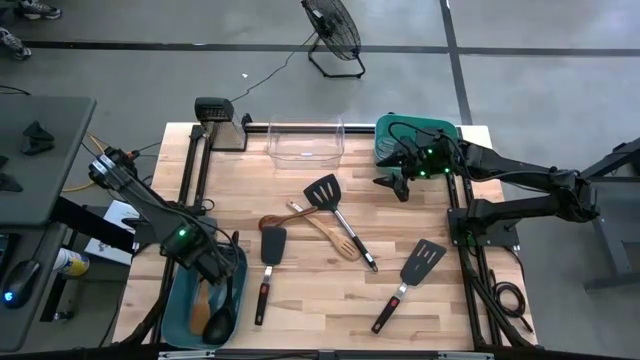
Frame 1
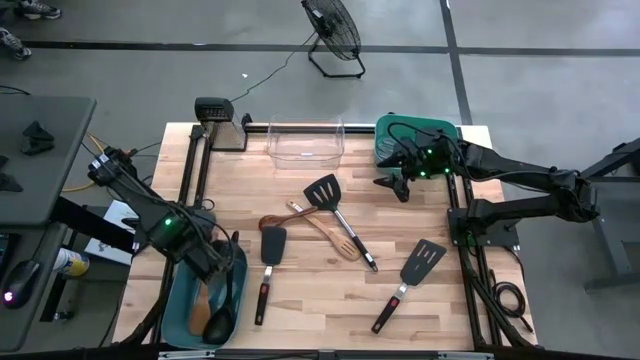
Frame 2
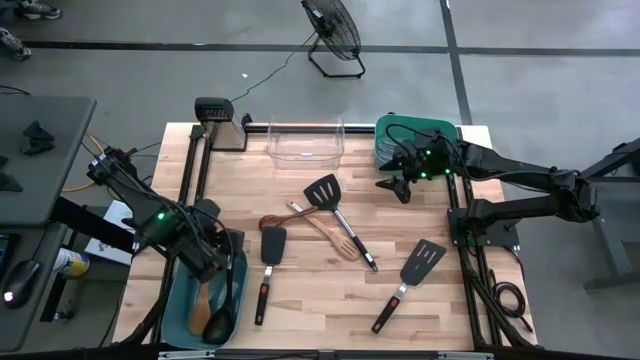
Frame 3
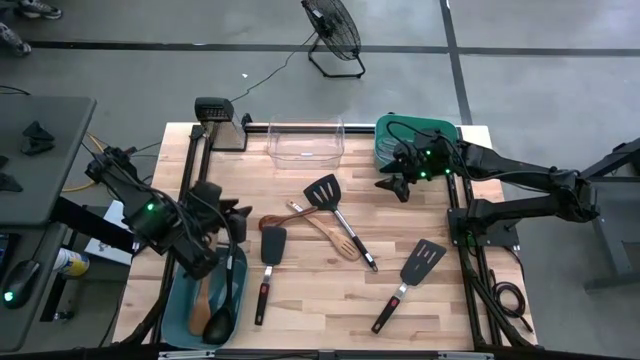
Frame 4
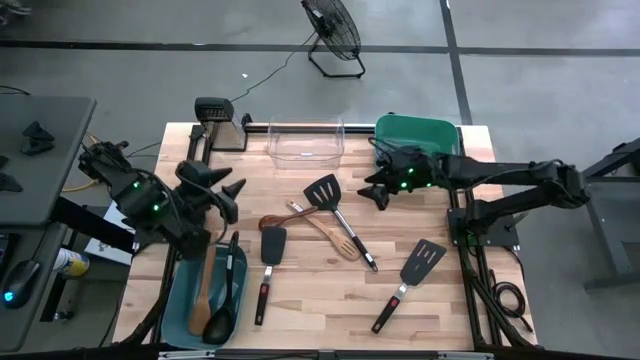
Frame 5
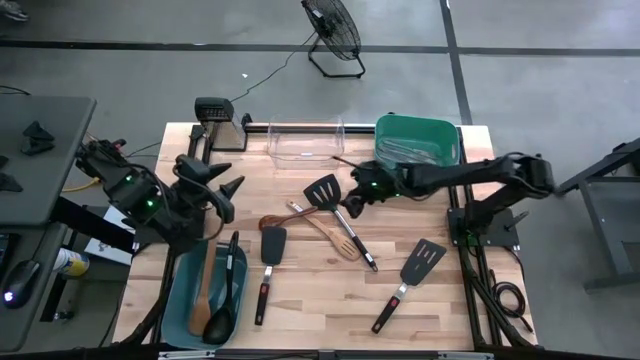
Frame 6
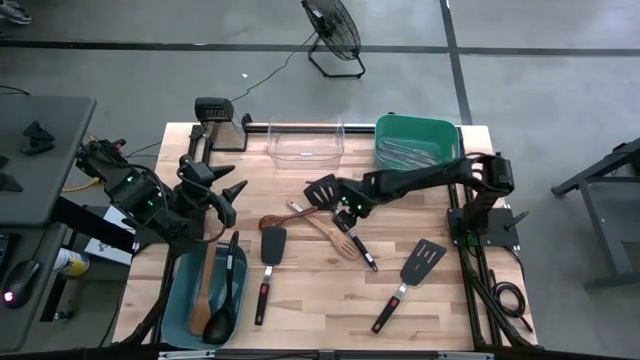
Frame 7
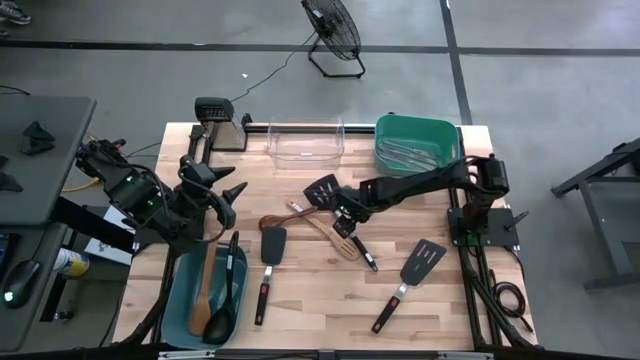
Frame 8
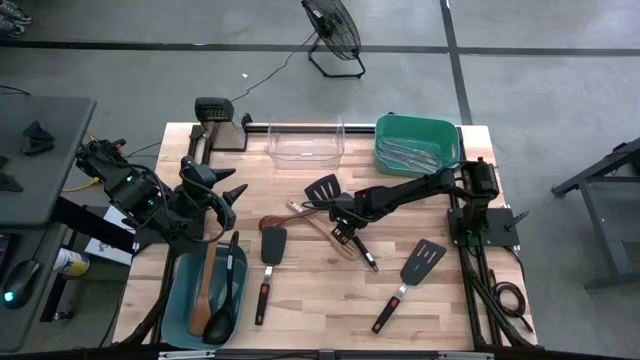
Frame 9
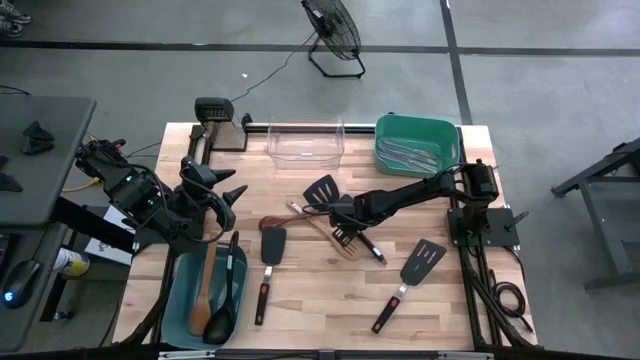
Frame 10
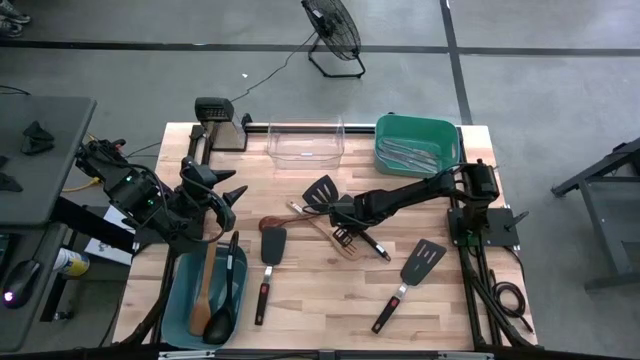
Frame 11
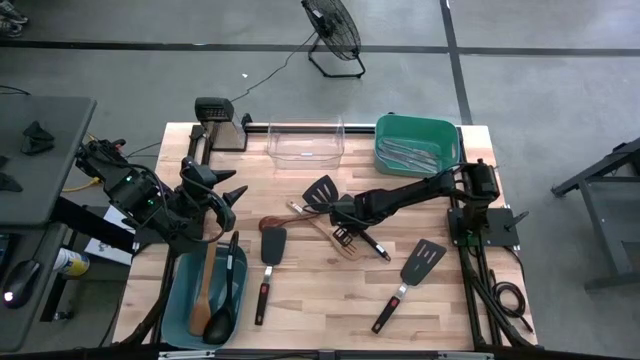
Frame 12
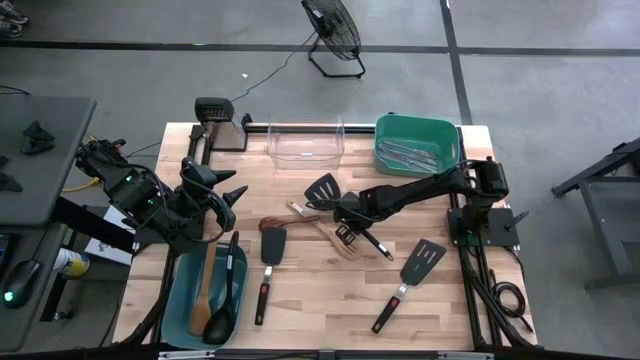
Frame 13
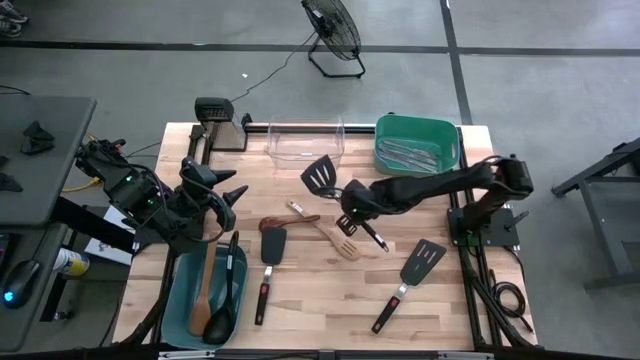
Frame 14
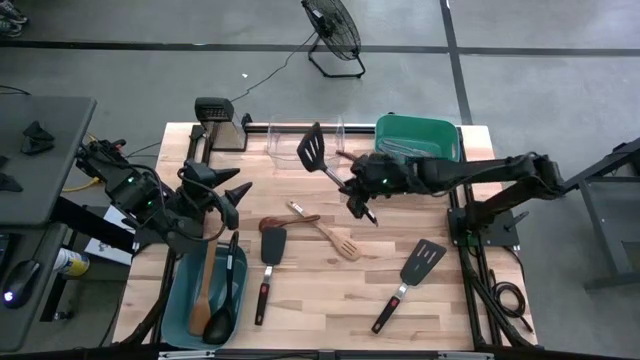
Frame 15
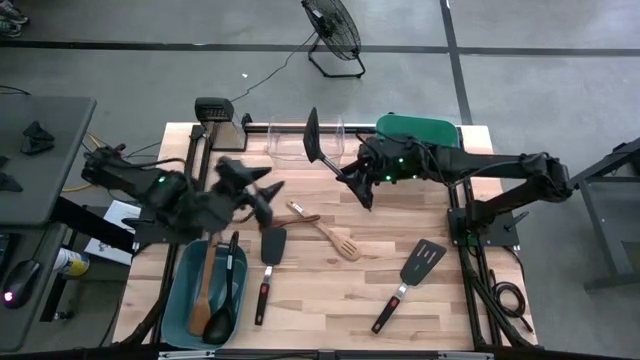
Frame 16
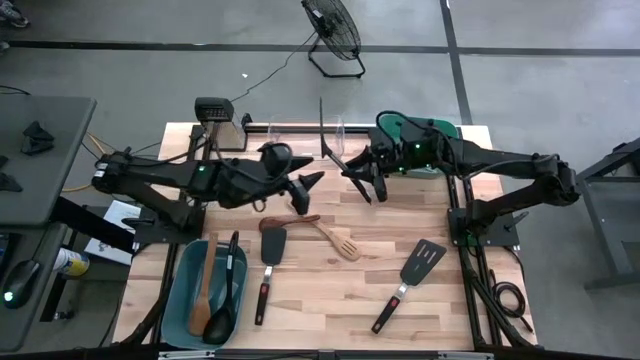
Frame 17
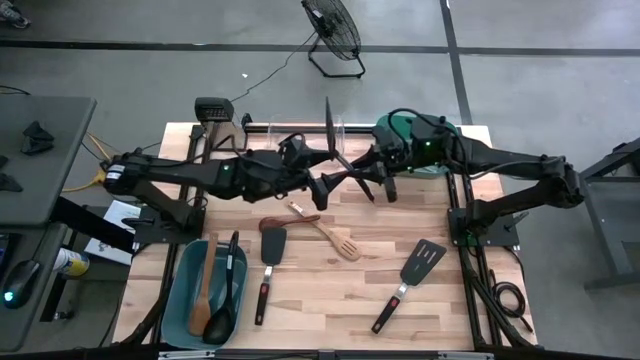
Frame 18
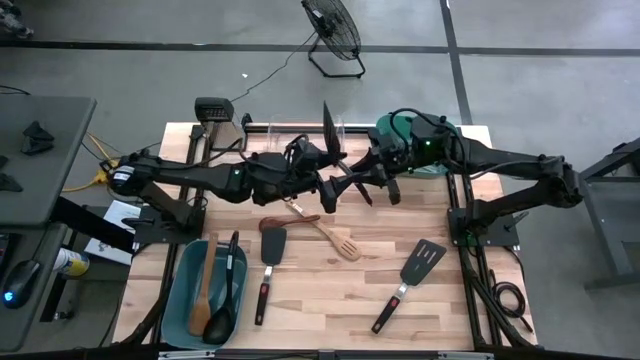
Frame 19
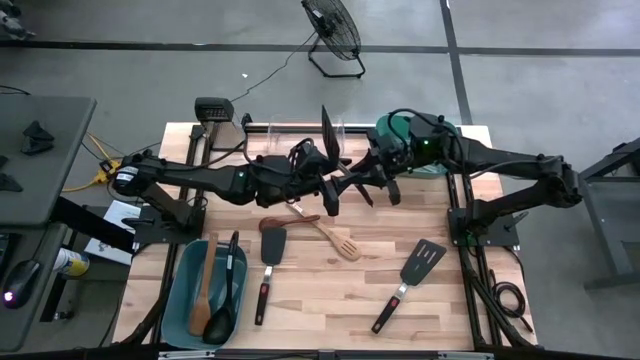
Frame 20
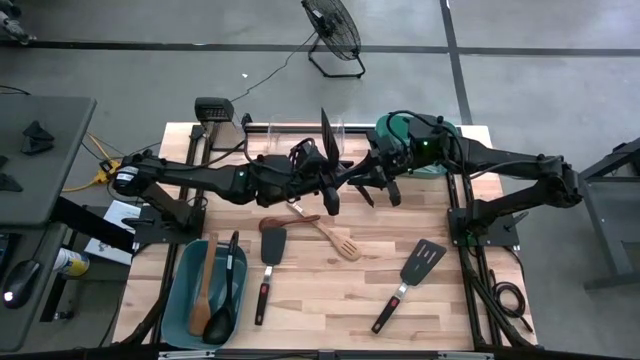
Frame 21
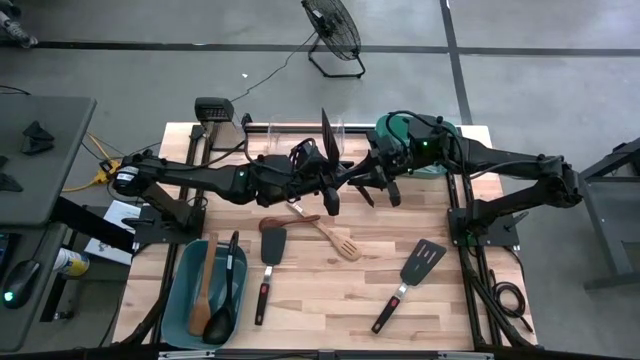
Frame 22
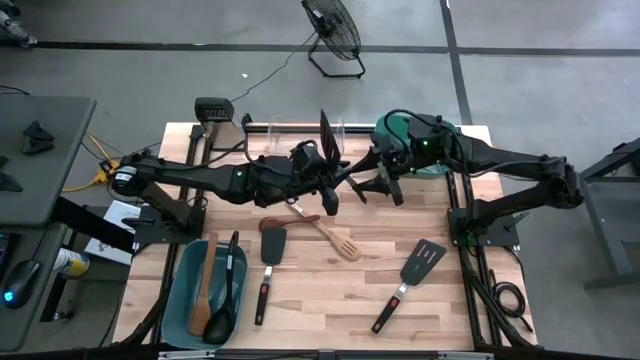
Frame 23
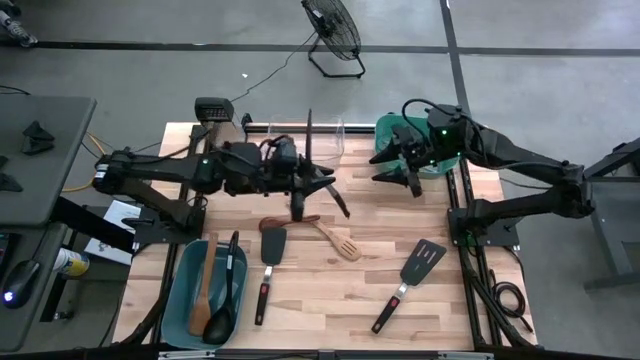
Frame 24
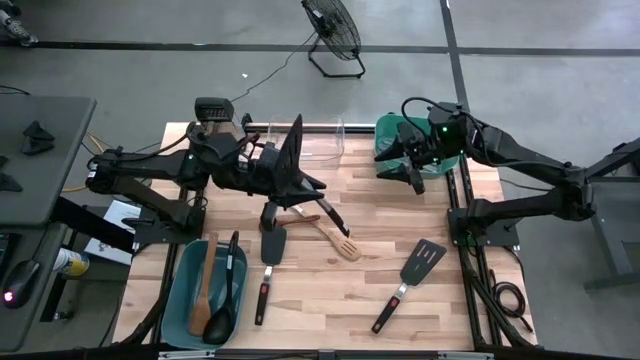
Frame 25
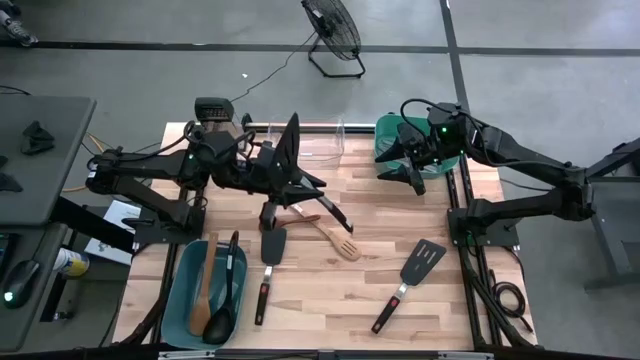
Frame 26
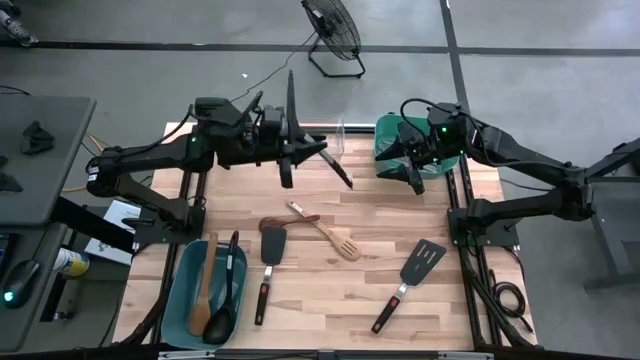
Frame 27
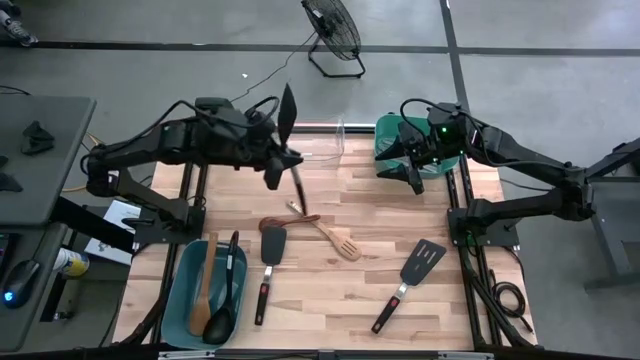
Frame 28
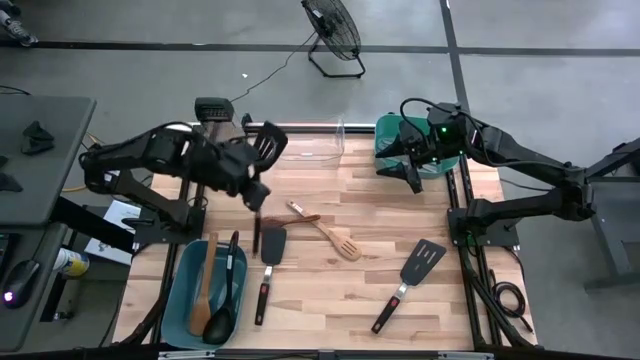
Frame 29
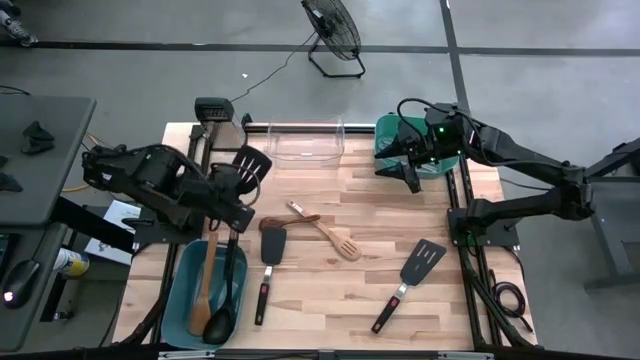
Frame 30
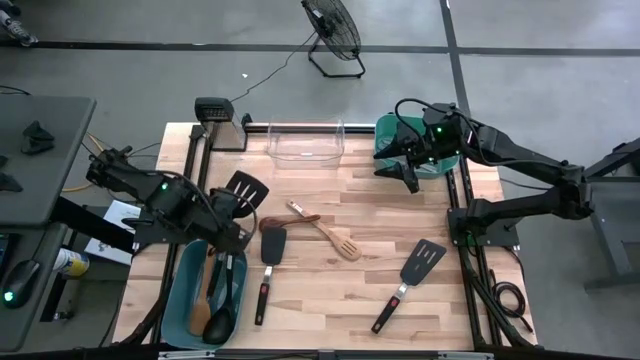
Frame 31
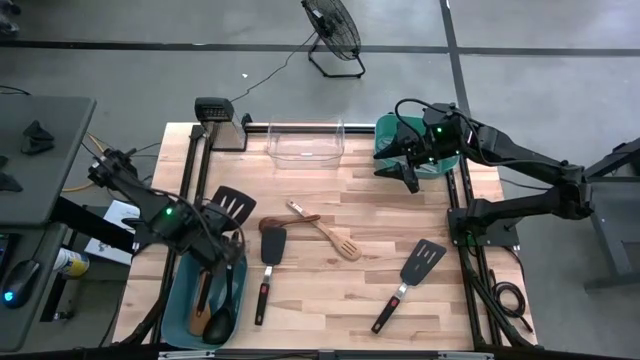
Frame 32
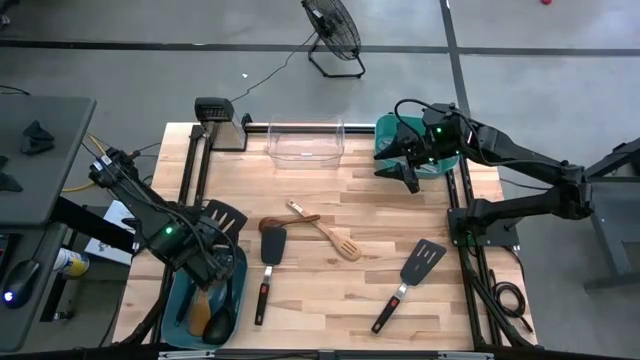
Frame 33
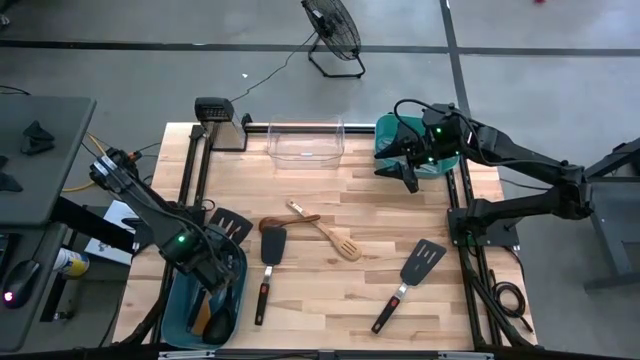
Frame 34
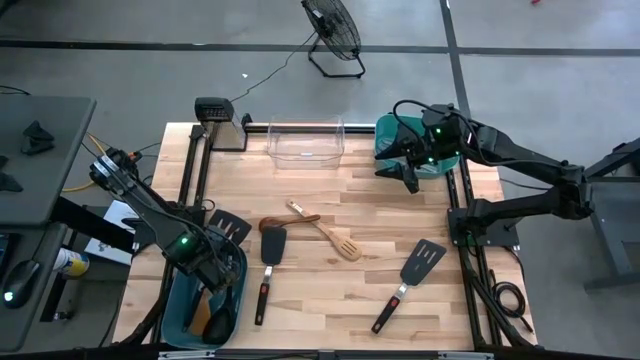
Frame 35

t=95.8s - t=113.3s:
Task: Pick & Place Kitchen Items
Put the top spatula into the blue bin

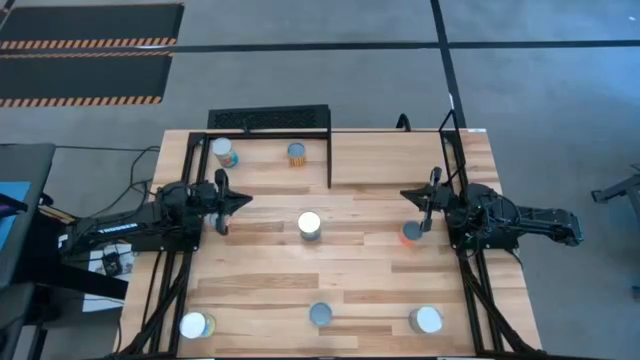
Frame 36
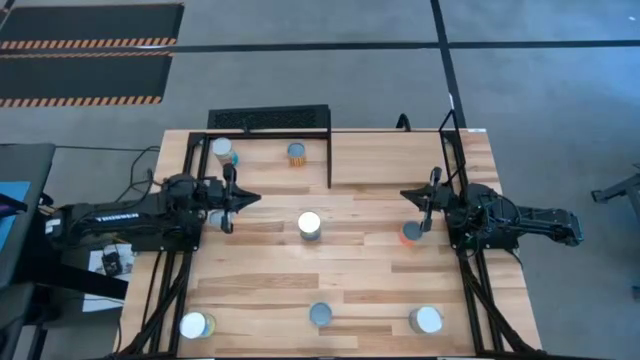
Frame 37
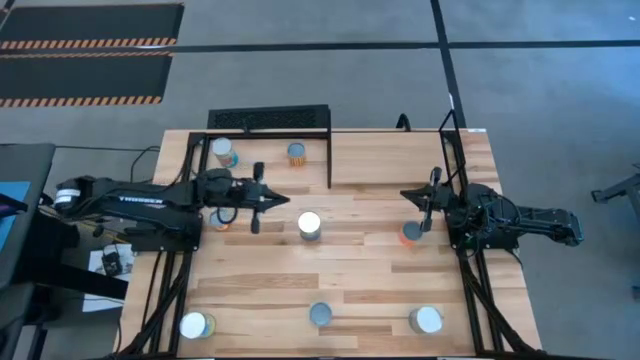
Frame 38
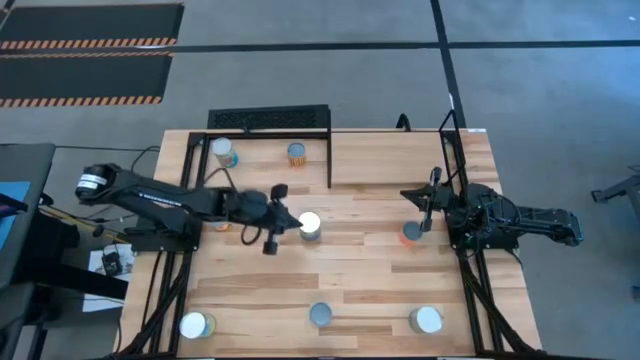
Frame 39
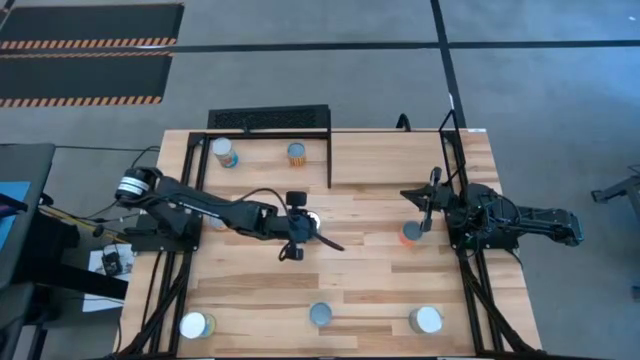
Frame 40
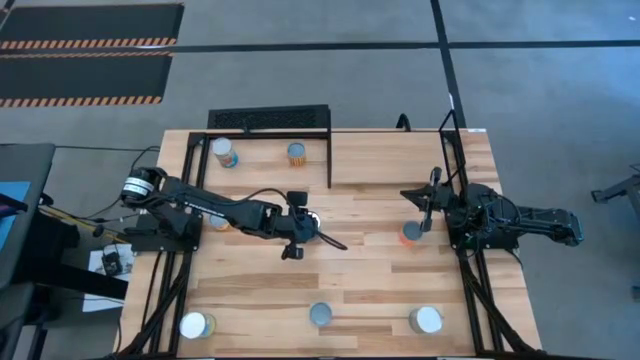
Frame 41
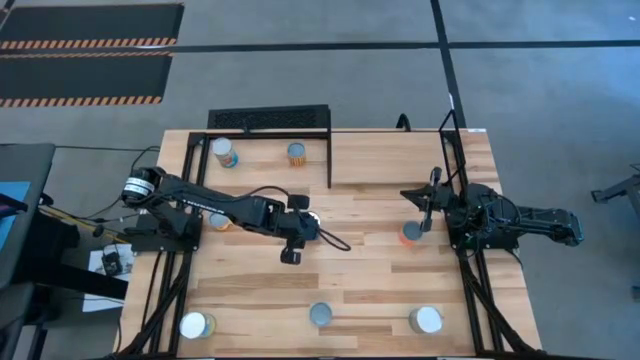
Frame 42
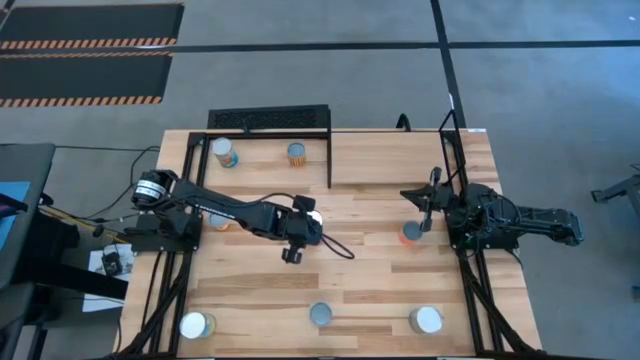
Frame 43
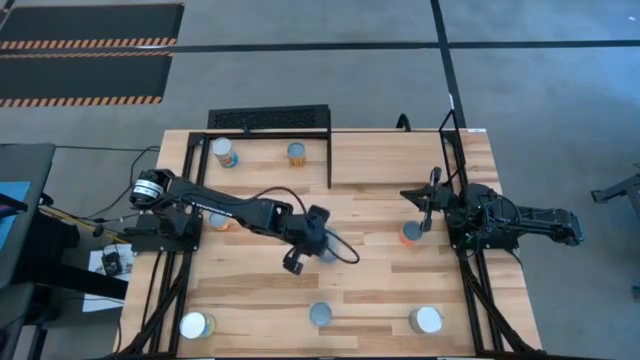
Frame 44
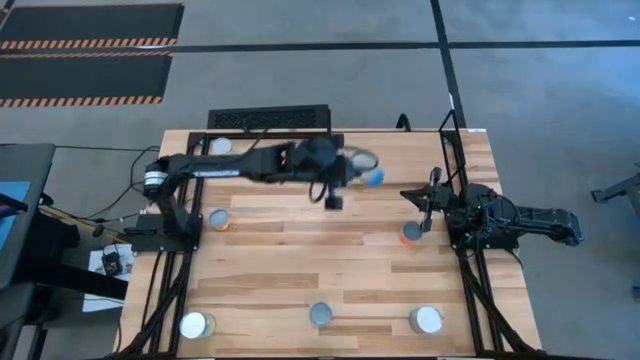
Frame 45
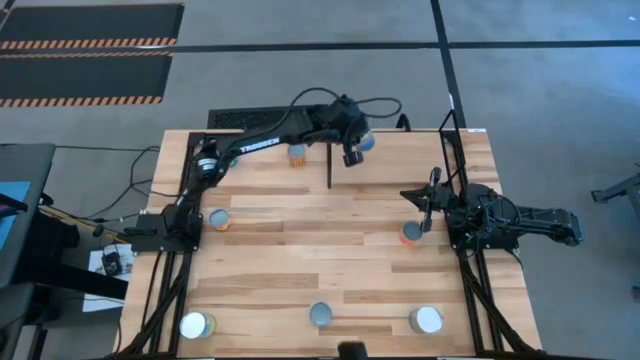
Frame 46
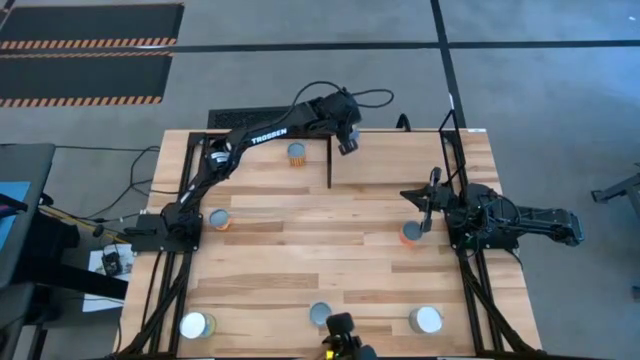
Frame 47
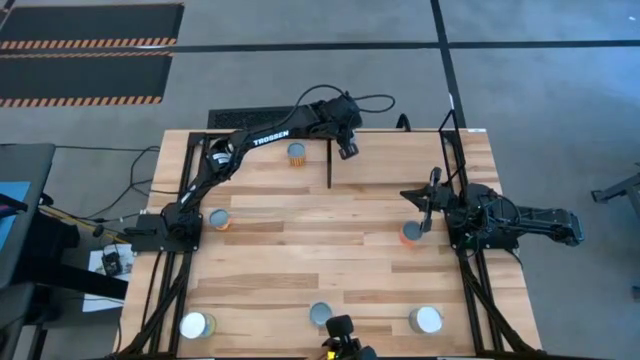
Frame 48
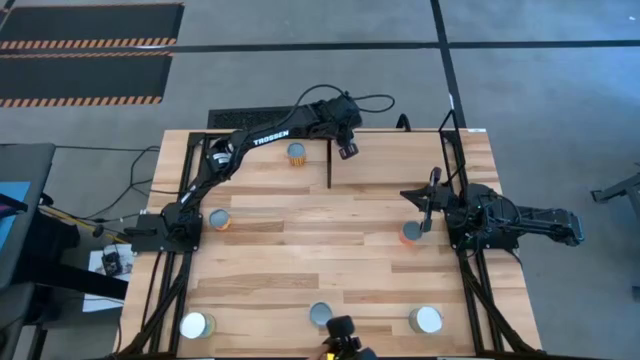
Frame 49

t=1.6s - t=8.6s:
Task: Pick and place cans onto a shelf
Put the canned peas on the shelf
